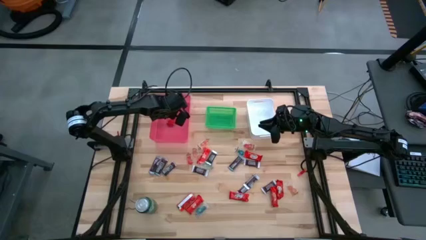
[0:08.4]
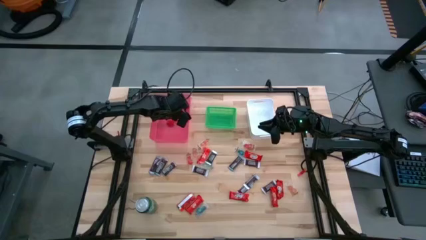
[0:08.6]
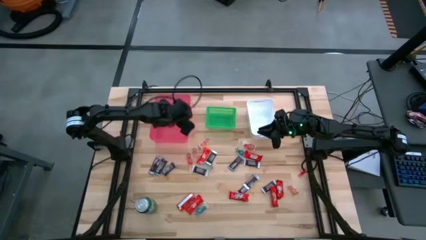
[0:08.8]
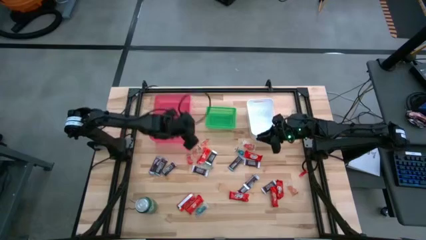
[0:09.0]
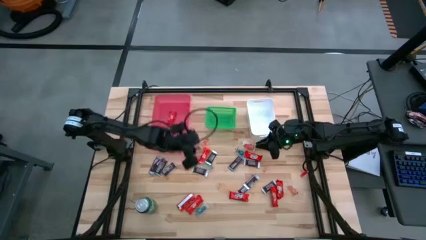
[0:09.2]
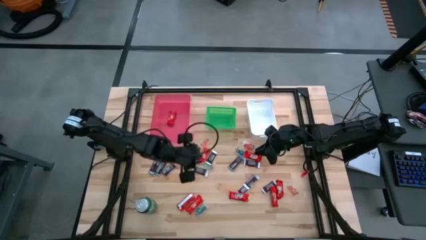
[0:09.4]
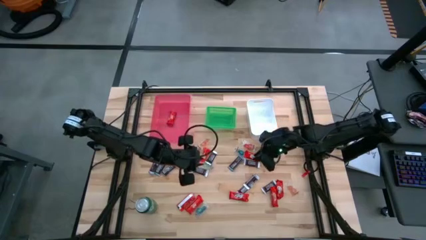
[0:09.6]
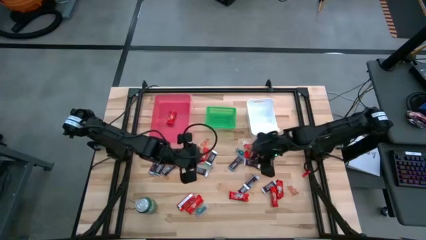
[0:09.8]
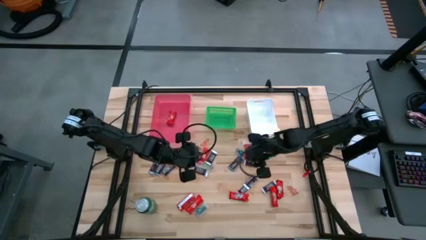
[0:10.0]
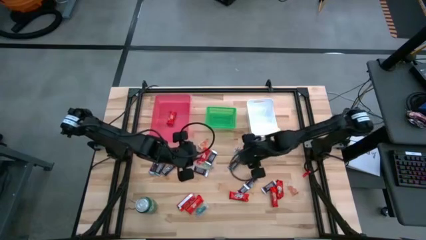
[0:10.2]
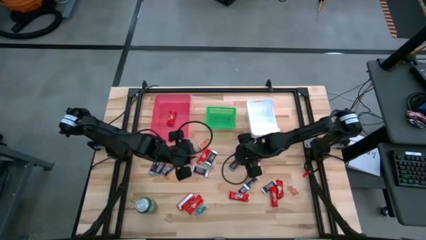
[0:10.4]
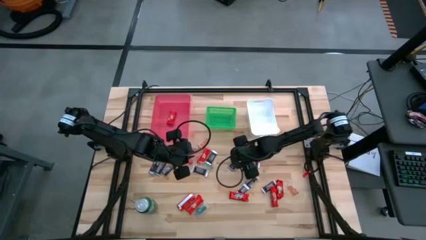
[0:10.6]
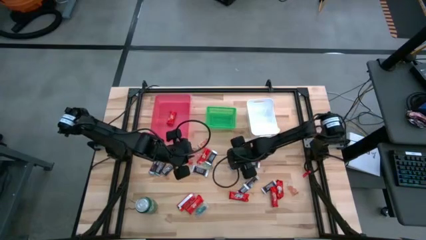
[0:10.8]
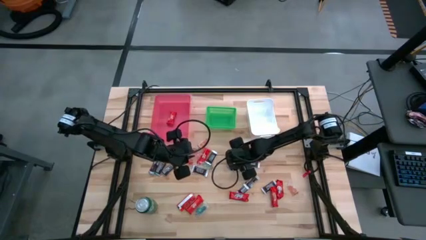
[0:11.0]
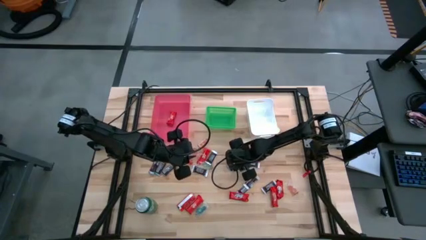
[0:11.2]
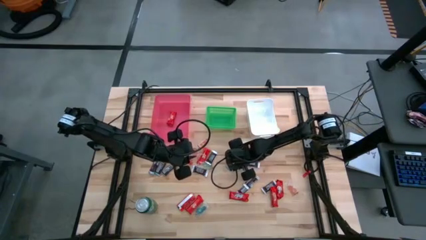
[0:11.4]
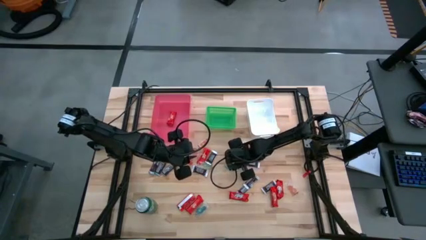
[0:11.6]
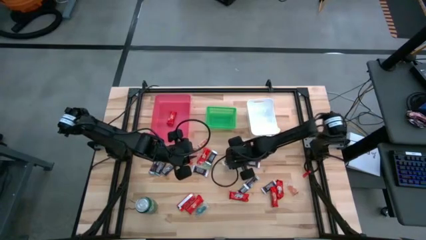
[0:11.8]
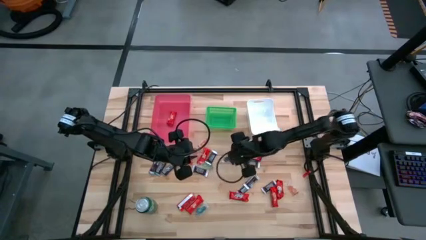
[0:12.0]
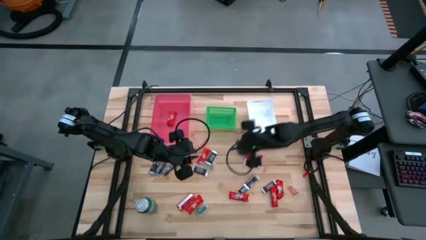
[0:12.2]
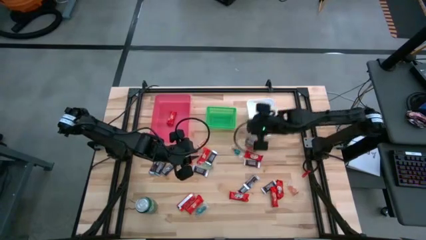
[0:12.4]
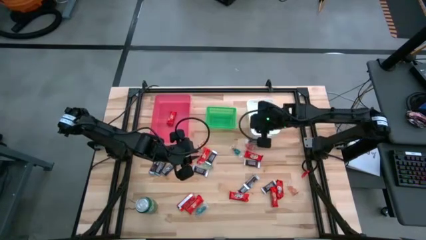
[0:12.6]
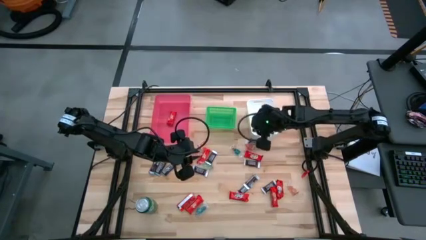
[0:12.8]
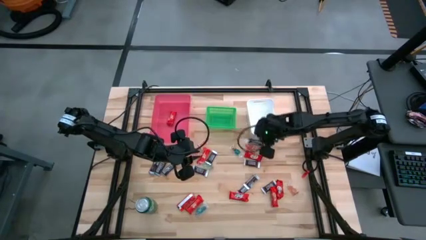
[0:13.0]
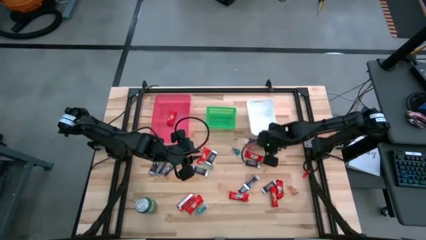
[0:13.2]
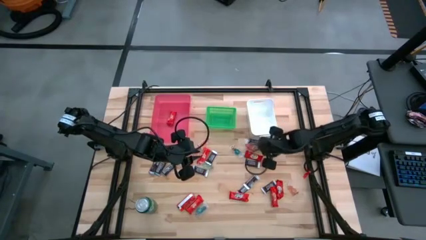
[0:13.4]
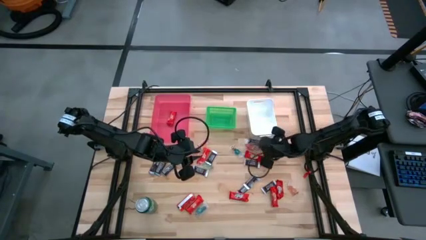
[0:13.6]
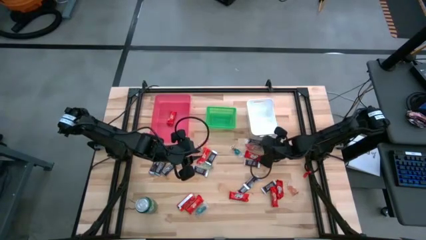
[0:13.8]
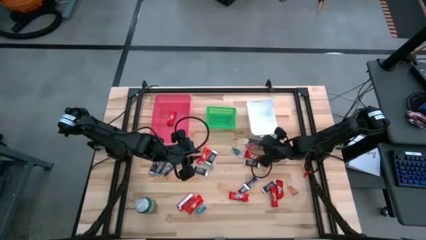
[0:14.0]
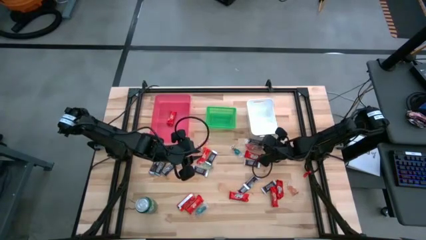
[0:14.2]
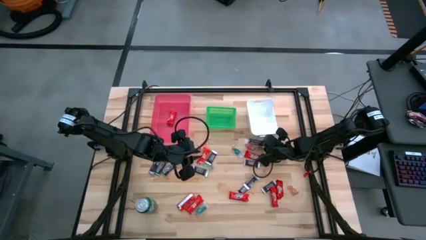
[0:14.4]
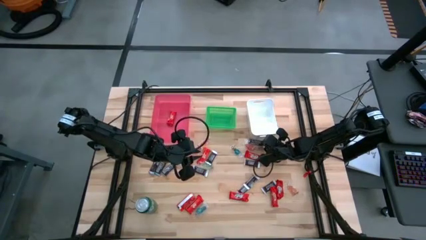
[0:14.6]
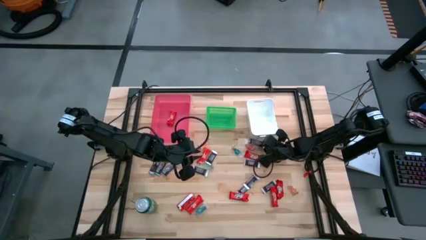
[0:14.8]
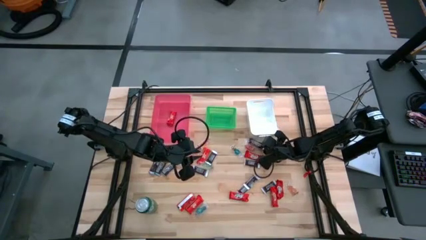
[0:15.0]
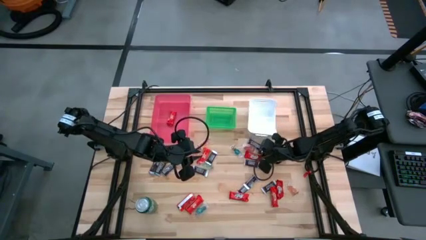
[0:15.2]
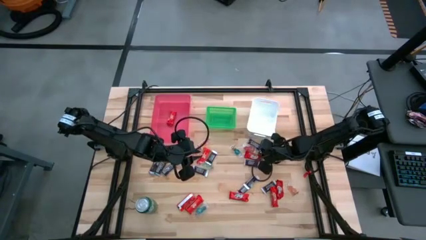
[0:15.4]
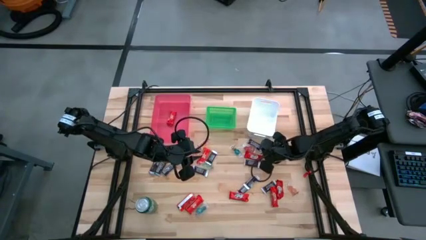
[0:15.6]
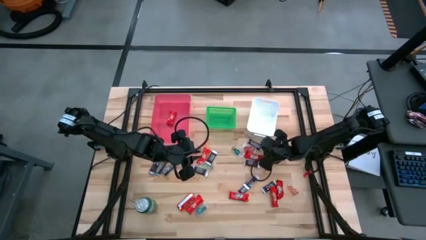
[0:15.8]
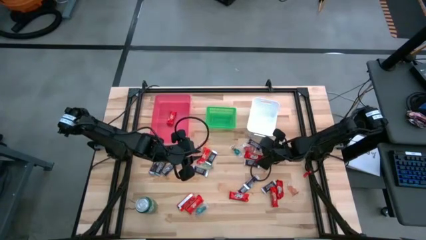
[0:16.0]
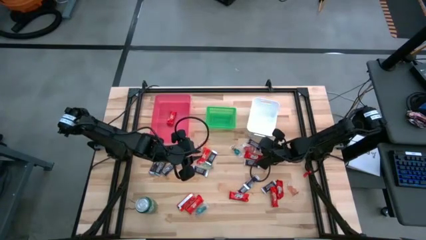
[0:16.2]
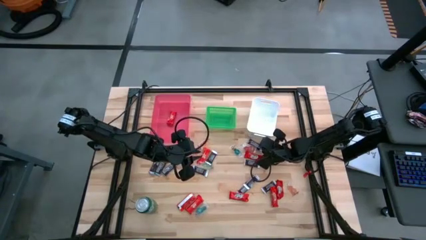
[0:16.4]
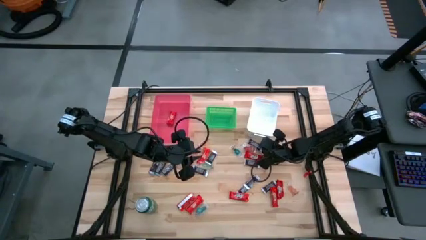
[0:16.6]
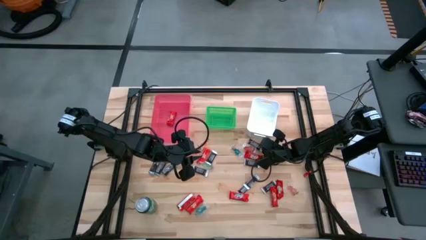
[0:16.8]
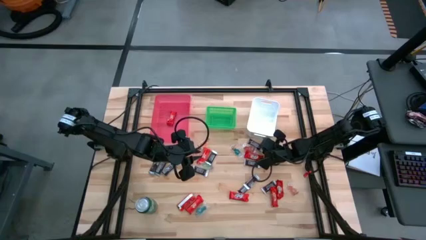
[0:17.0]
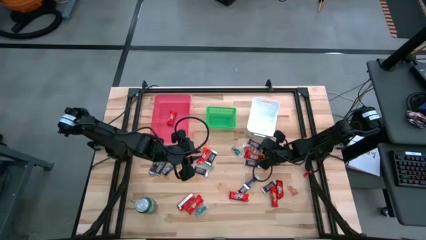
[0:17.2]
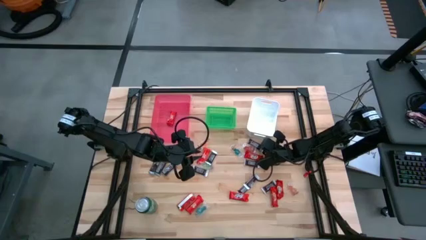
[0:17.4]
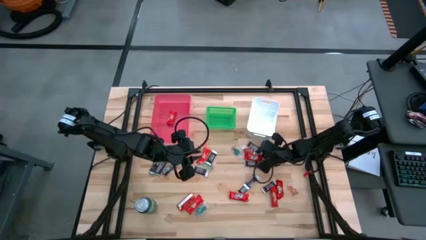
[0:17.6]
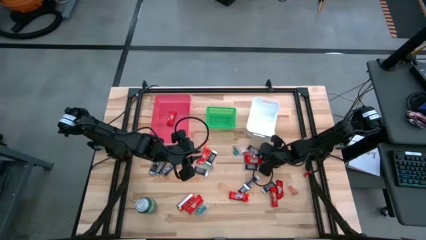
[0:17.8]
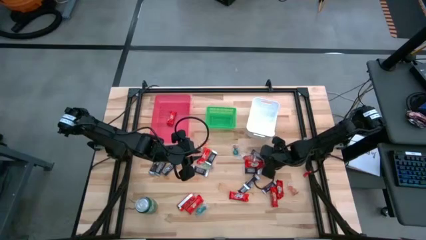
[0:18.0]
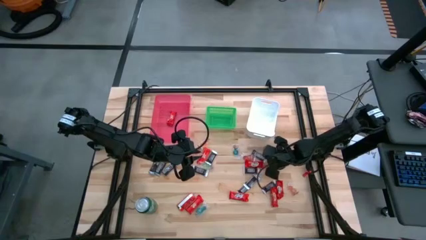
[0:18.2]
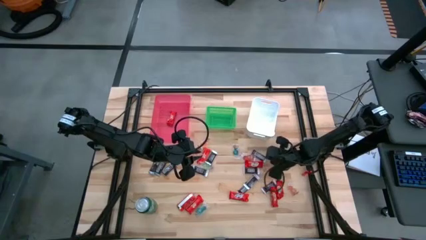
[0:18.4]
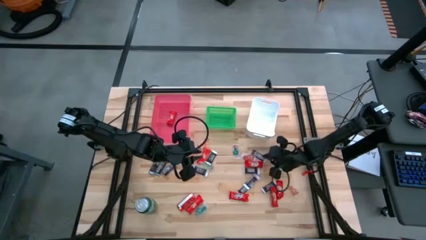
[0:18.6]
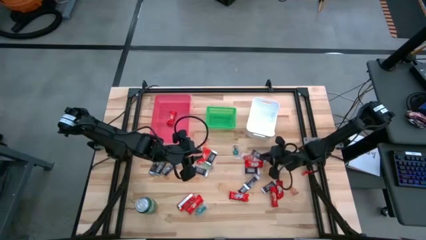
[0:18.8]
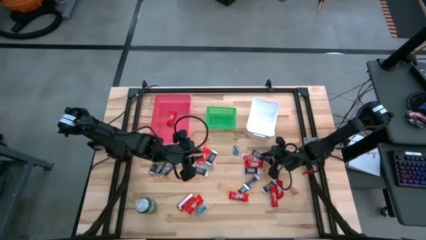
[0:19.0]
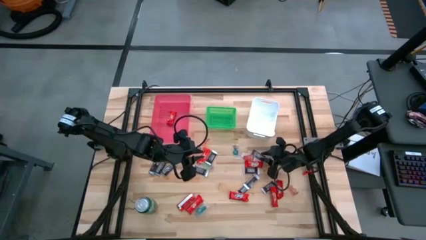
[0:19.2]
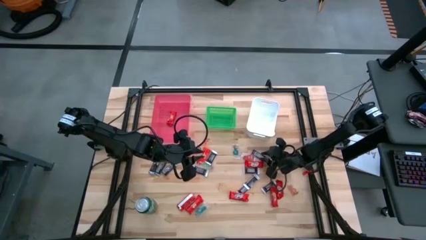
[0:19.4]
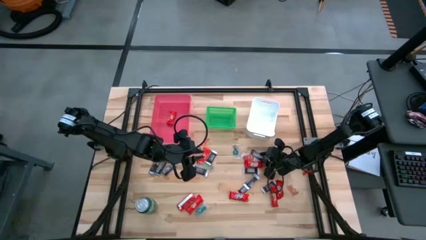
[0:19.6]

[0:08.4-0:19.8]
Task: Sort candy
Put the brown chocolate bar into the white bin
